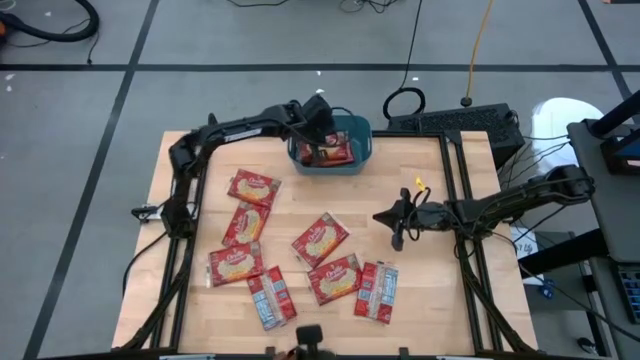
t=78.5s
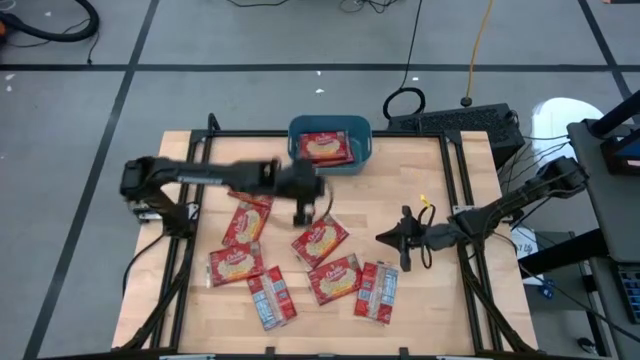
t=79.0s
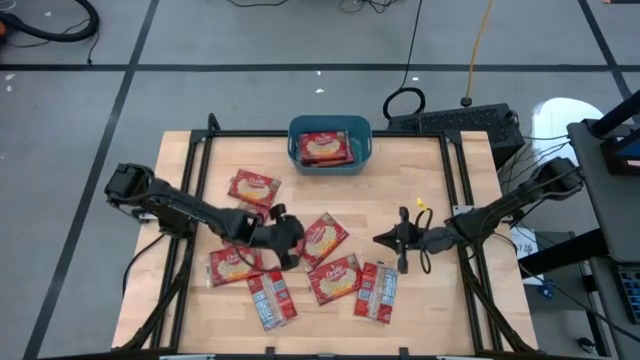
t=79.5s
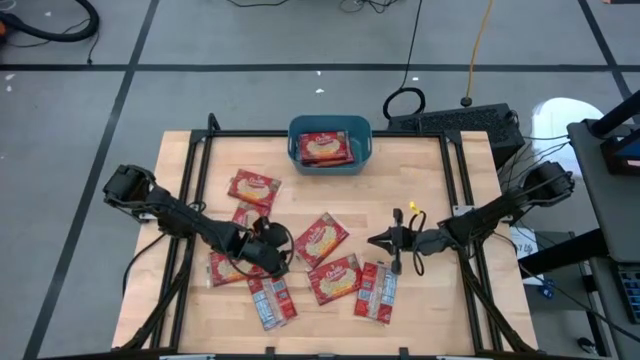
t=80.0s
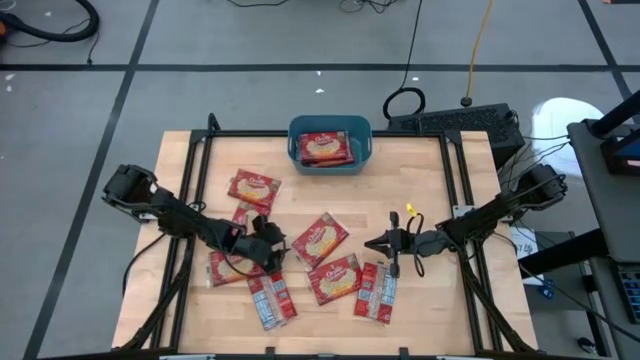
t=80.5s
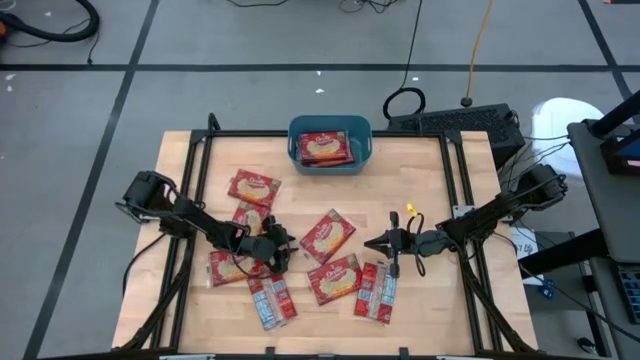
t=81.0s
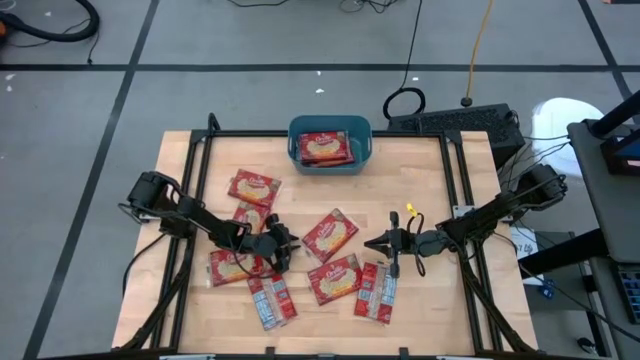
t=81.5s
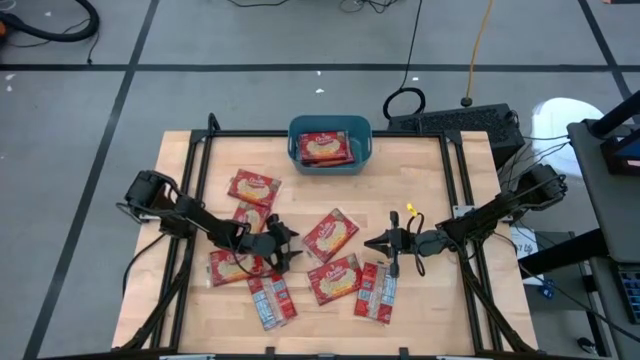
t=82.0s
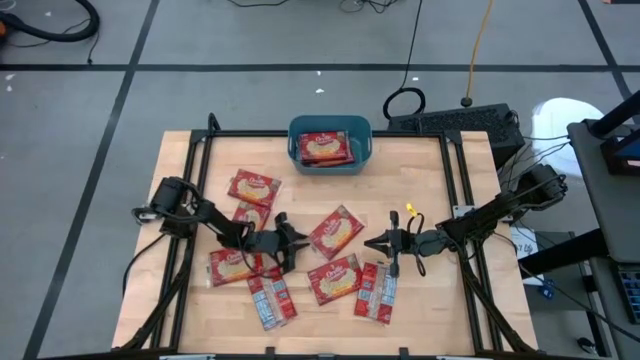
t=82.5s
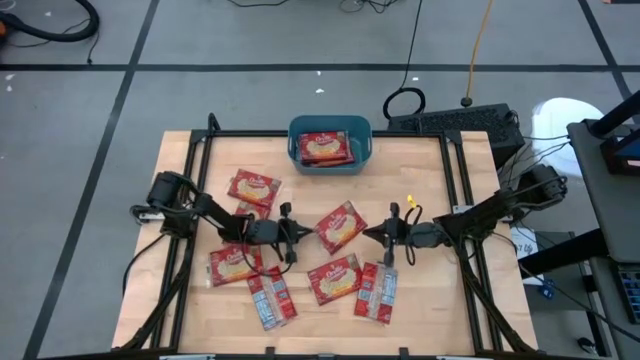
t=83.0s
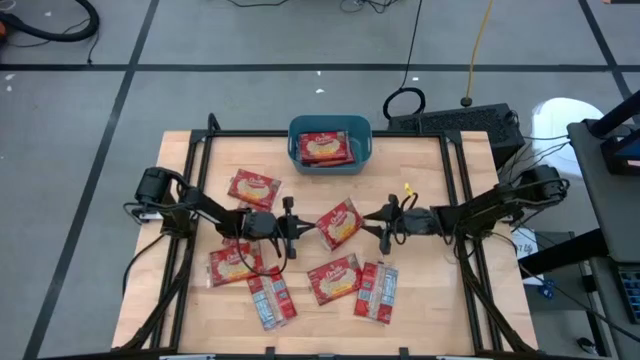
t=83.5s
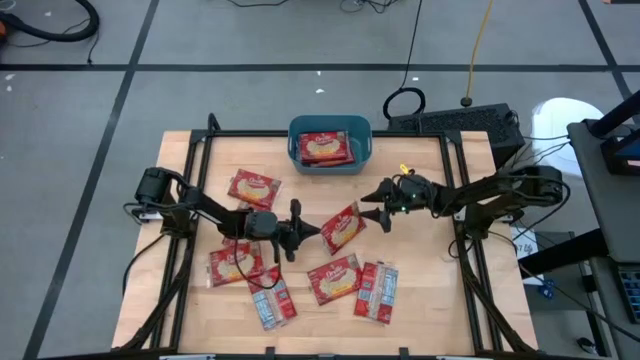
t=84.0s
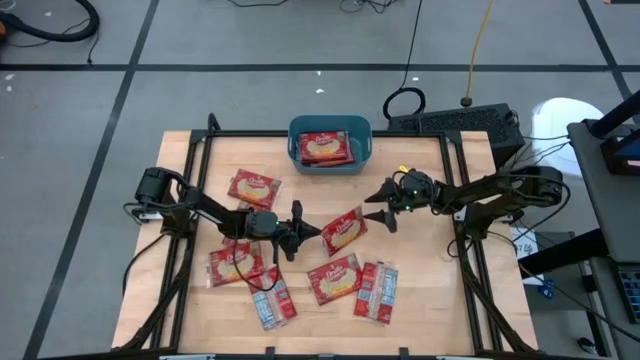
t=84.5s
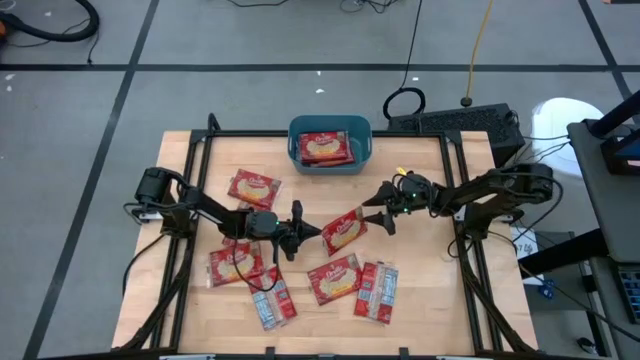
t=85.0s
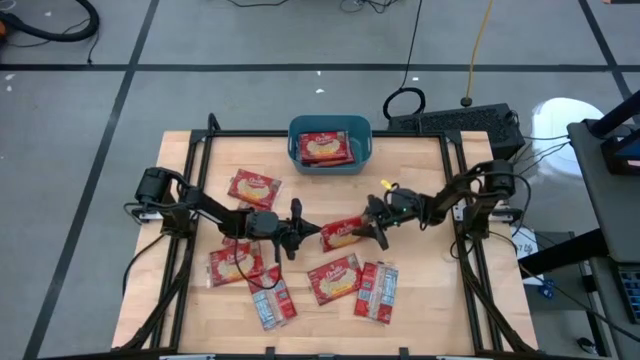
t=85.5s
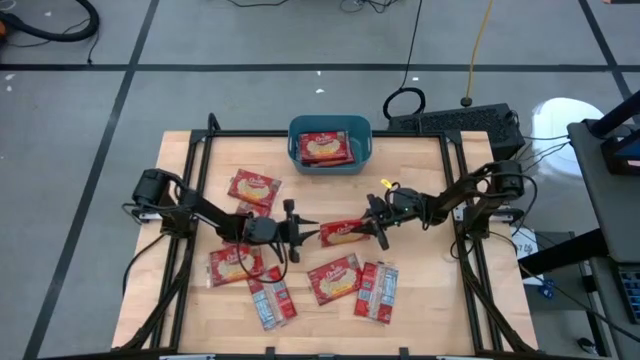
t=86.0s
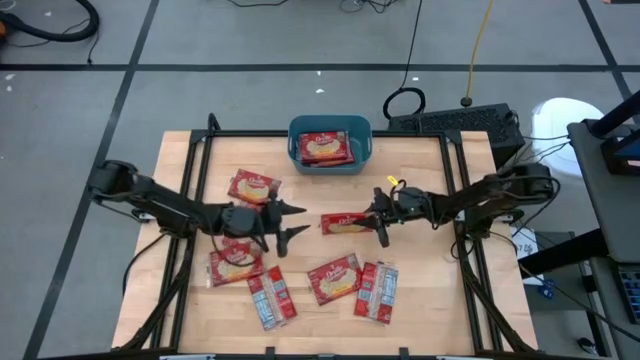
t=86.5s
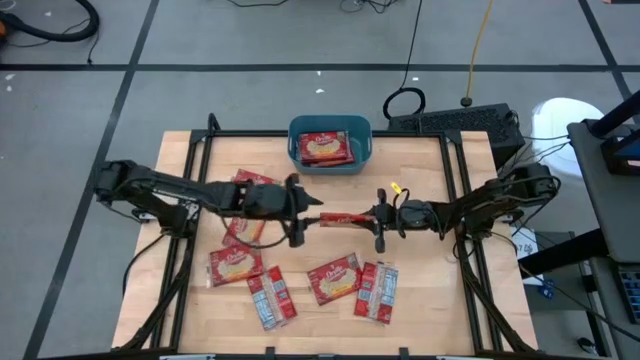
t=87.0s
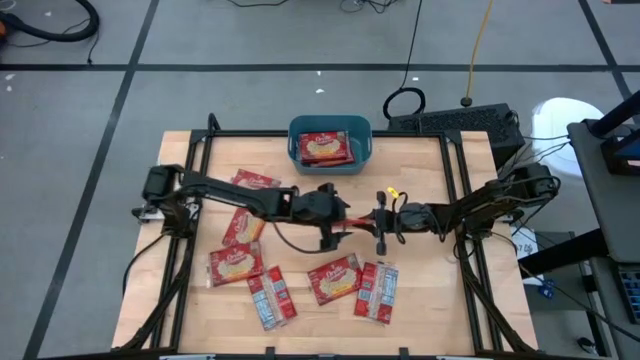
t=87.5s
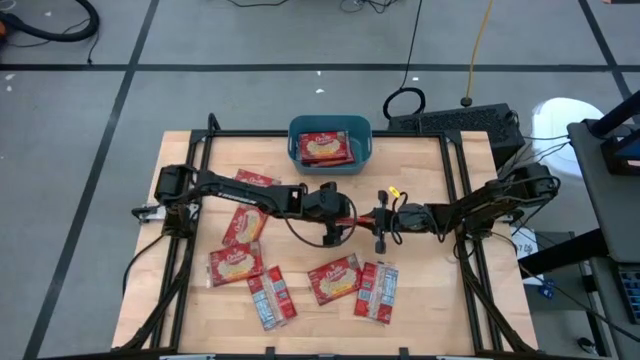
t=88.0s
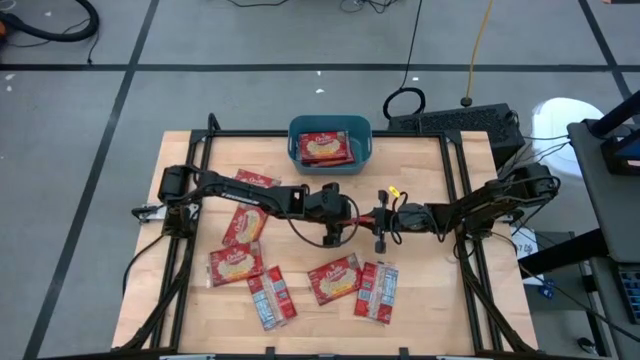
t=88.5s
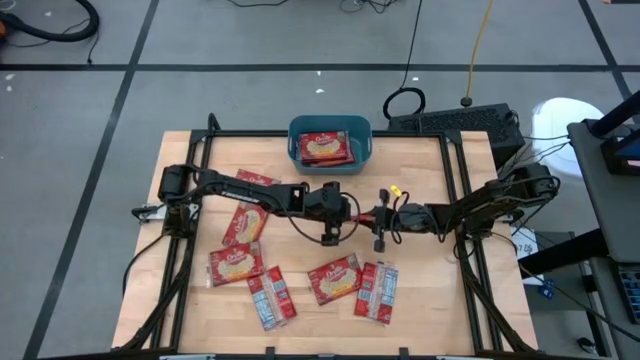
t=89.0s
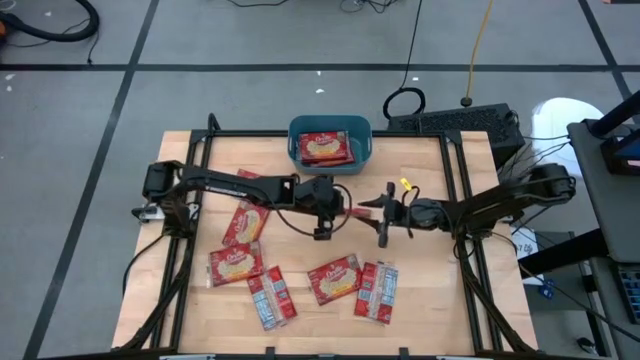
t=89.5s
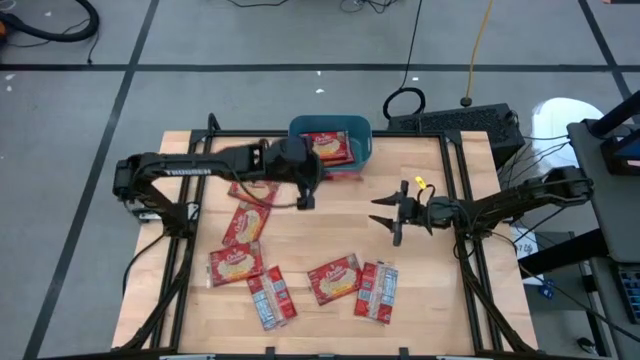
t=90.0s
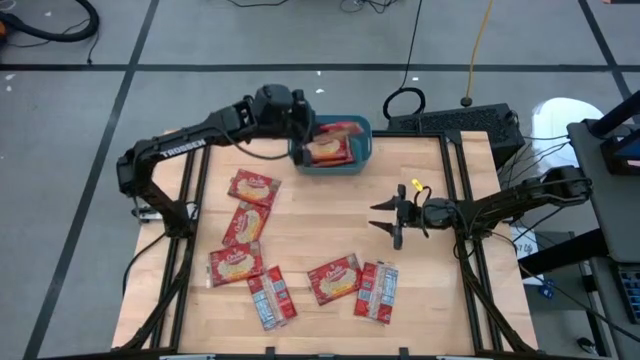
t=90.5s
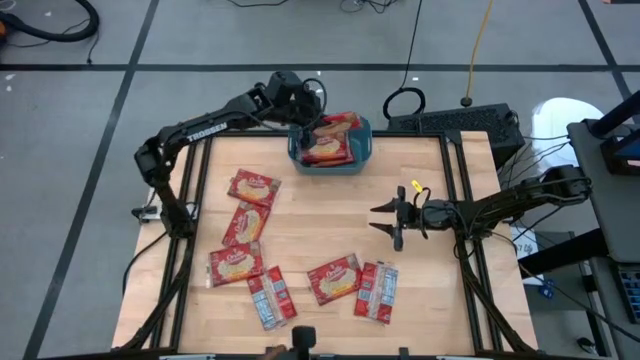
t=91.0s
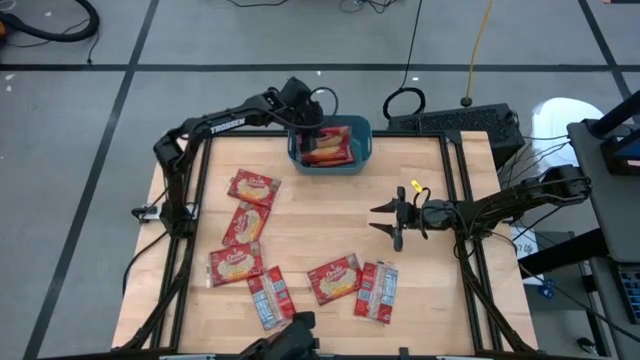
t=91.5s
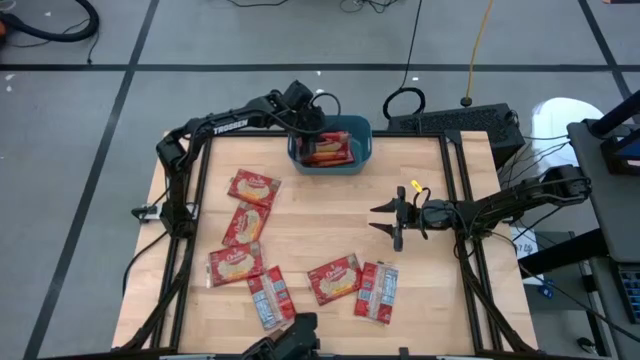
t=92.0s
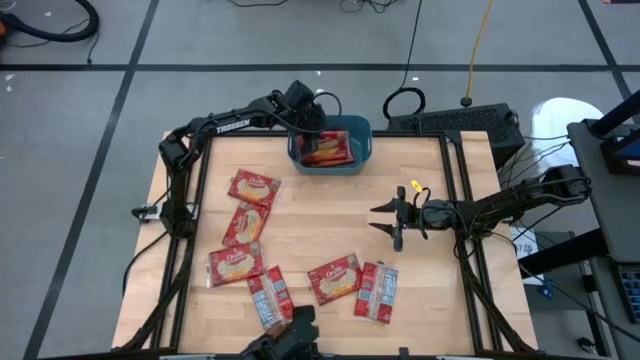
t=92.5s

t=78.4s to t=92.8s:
Task: Sort popcorn bags into baskets
Put the red popcorn bag into the blue bin

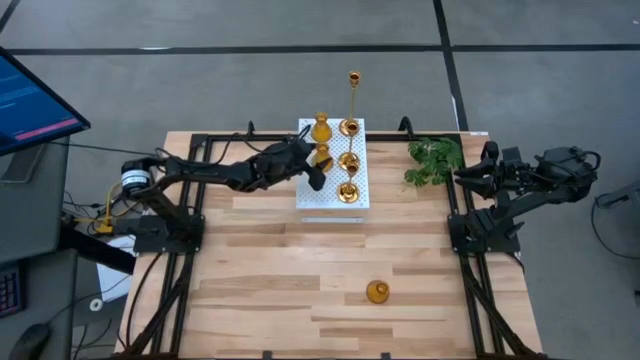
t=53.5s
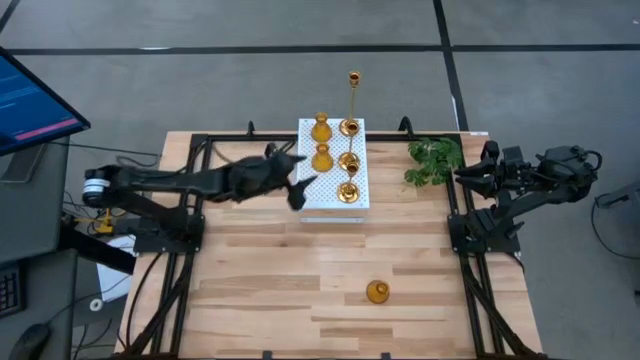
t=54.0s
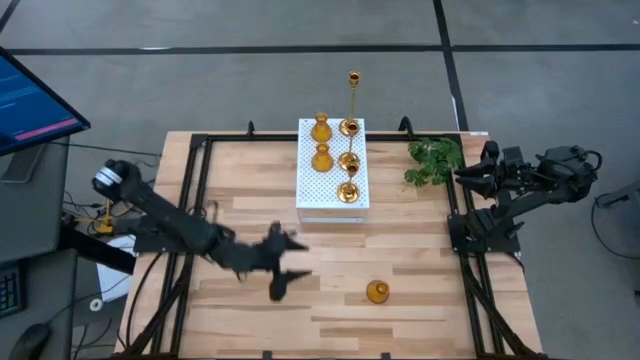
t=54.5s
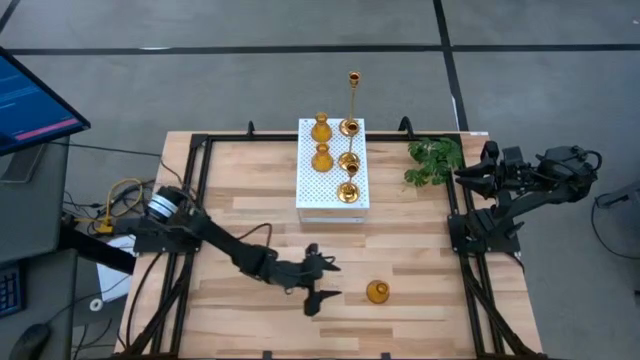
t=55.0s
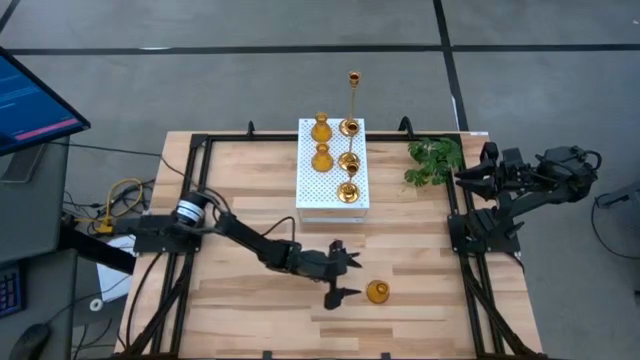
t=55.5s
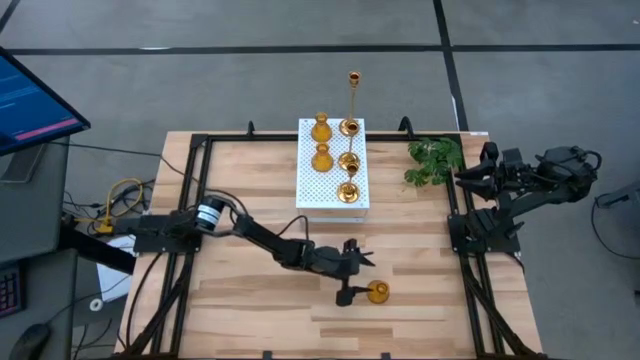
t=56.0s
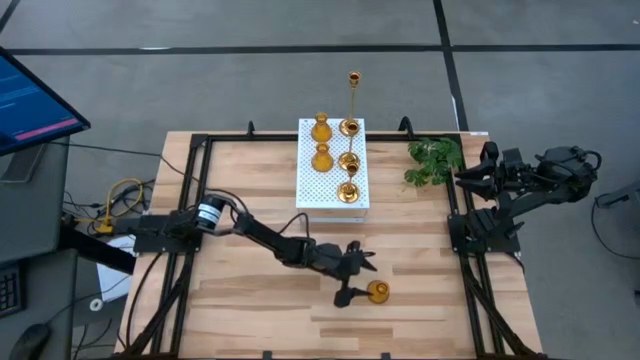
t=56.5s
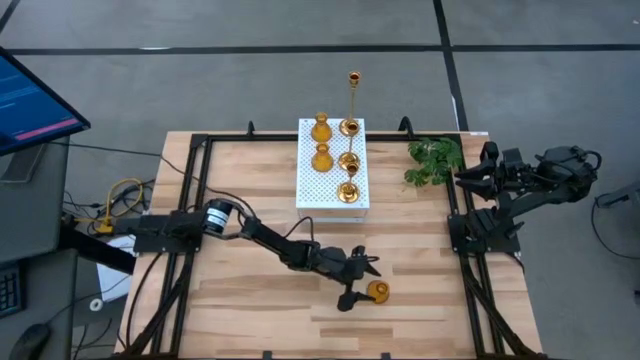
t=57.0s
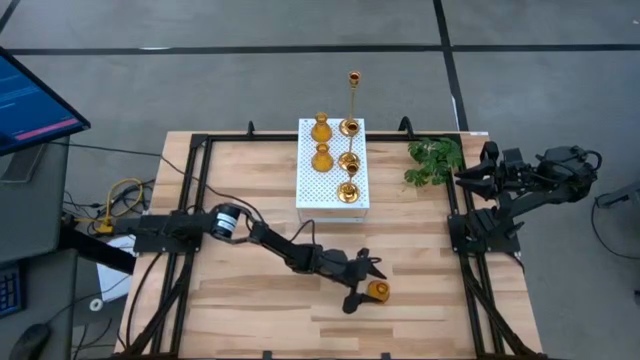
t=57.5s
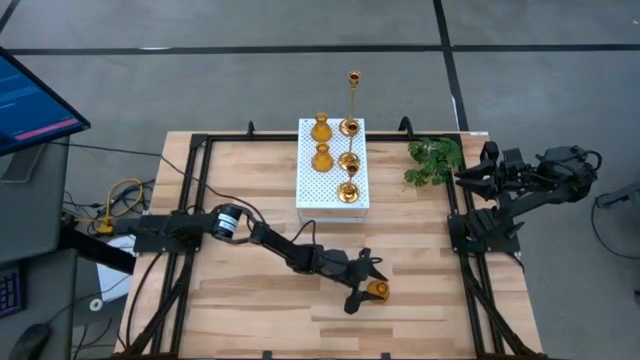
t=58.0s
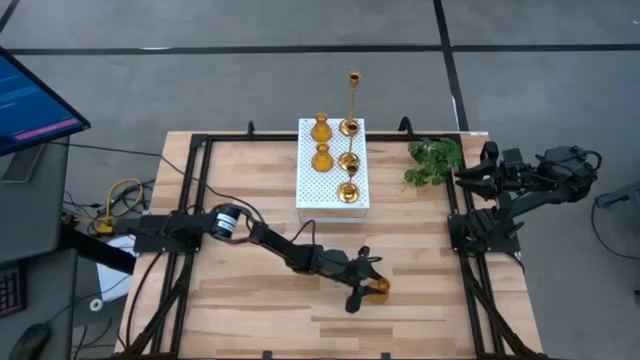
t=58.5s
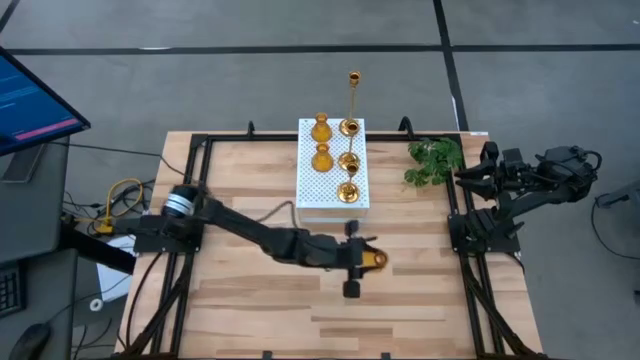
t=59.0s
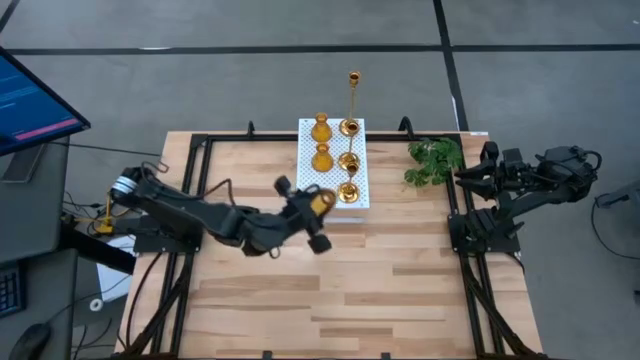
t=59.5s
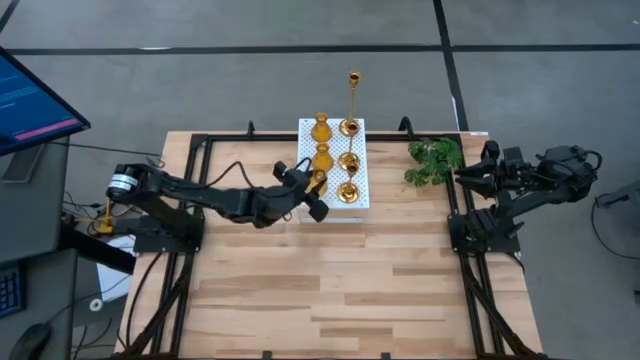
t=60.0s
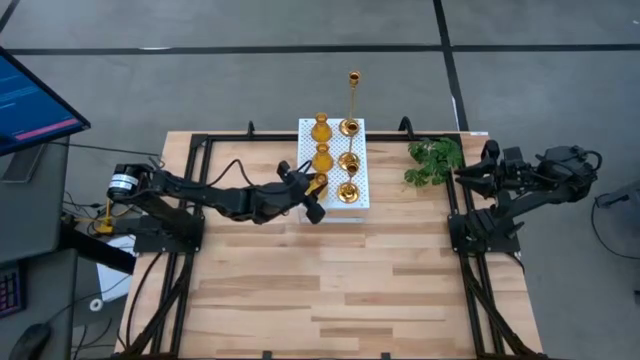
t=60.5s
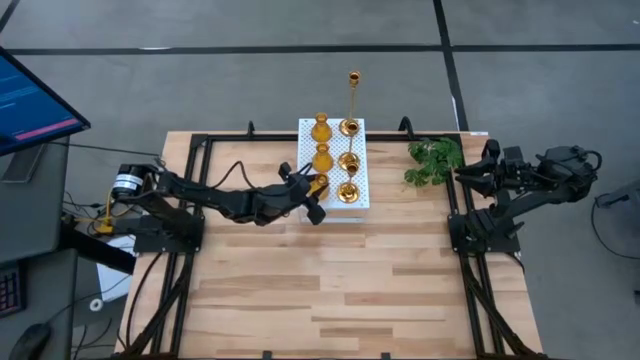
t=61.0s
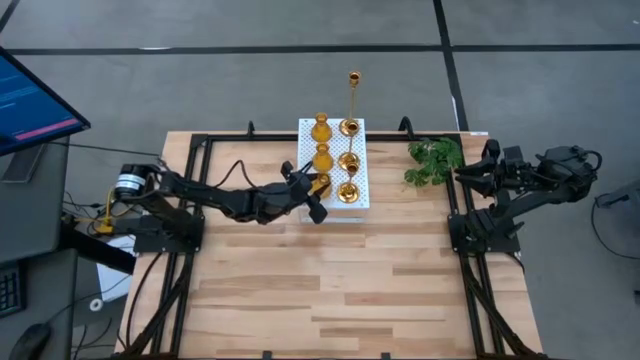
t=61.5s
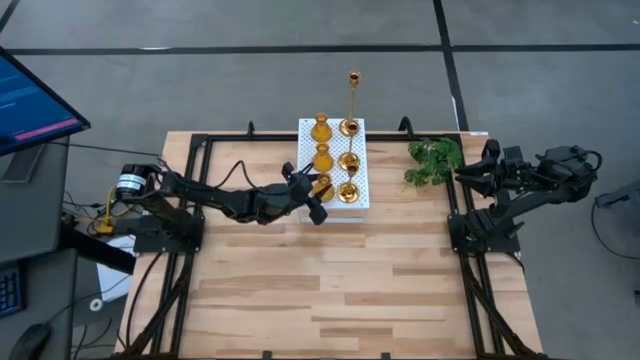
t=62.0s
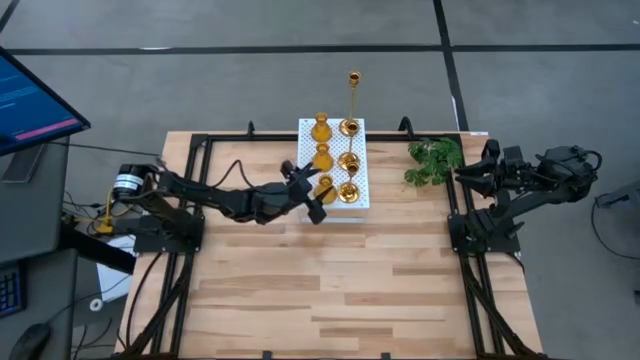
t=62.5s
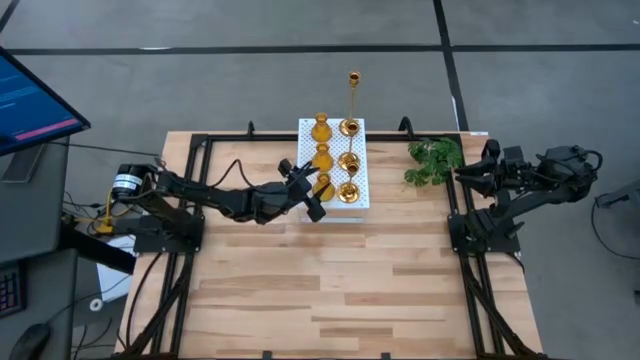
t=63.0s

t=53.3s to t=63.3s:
Task: Pick & Place candle stick holders
Align the orange candle holder with the other orange candle holders on the shelf
